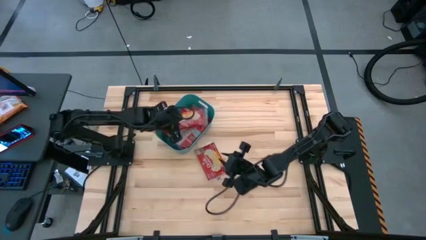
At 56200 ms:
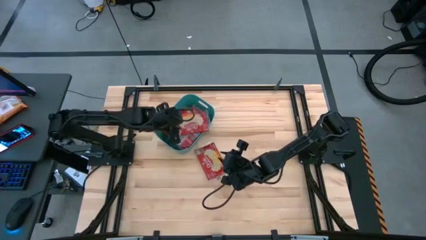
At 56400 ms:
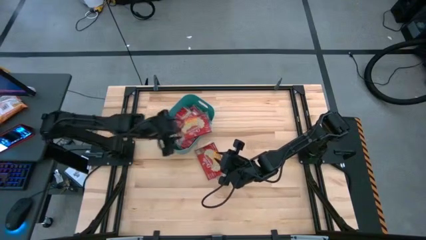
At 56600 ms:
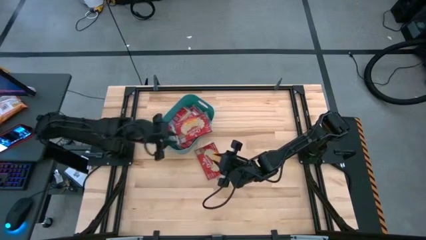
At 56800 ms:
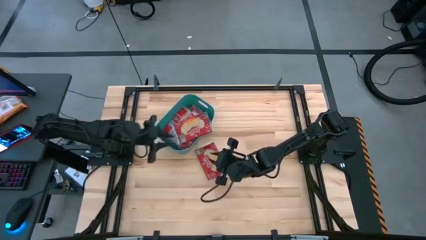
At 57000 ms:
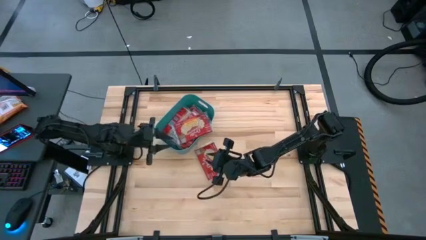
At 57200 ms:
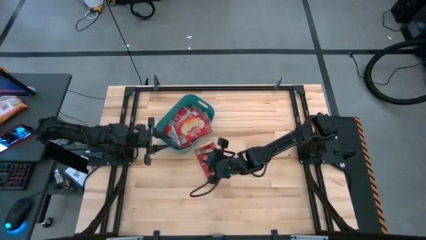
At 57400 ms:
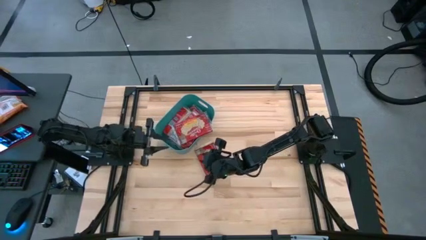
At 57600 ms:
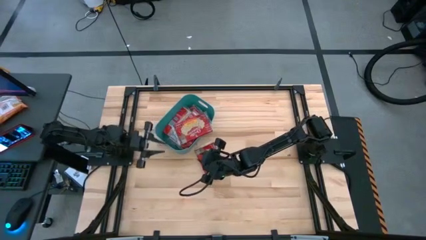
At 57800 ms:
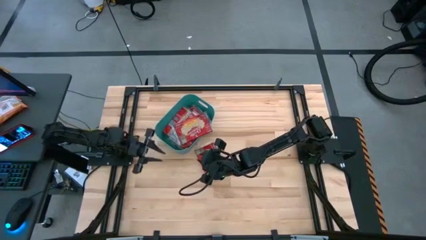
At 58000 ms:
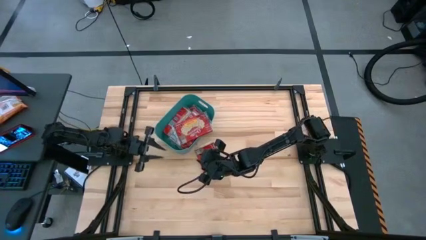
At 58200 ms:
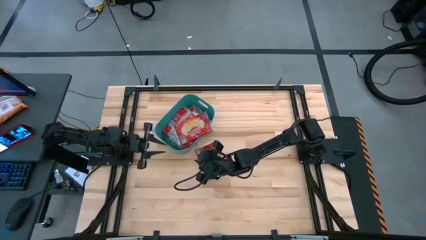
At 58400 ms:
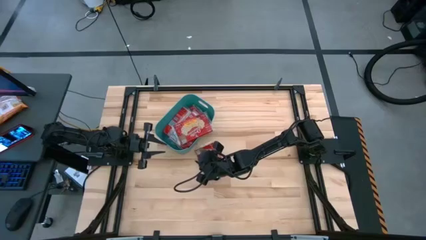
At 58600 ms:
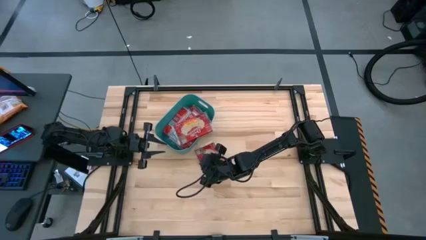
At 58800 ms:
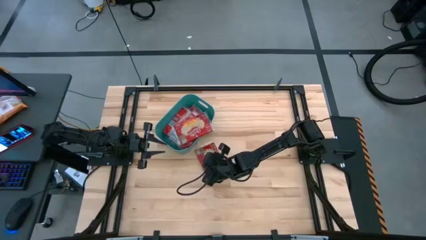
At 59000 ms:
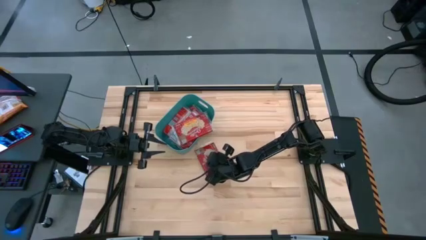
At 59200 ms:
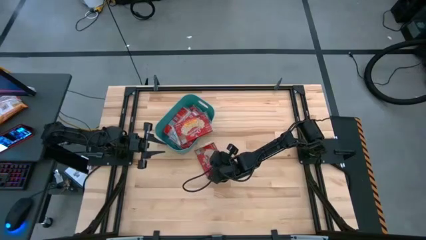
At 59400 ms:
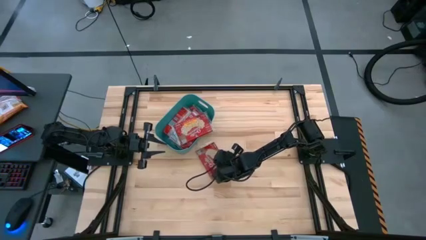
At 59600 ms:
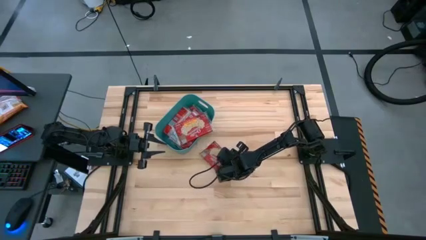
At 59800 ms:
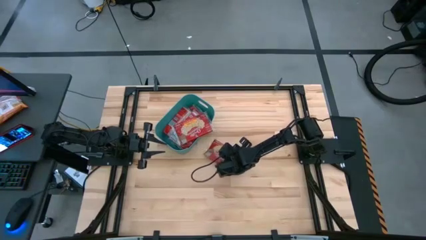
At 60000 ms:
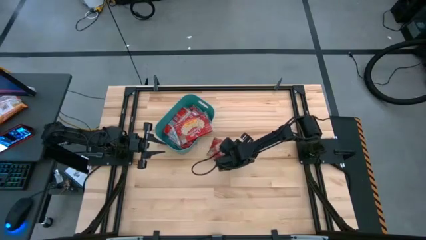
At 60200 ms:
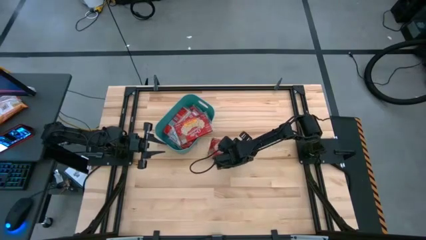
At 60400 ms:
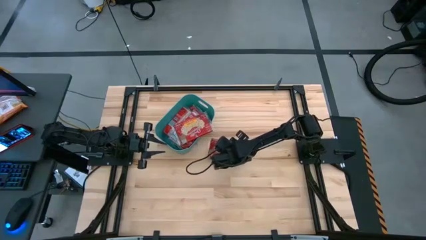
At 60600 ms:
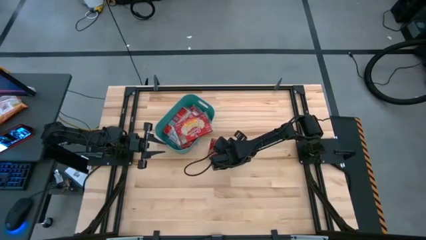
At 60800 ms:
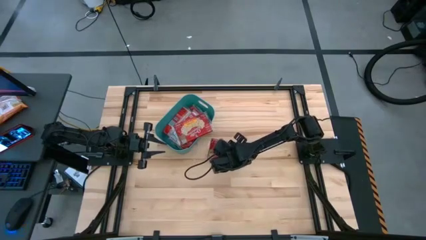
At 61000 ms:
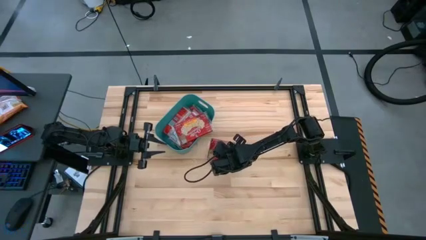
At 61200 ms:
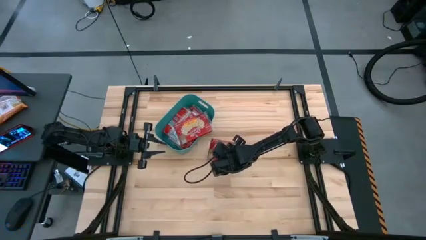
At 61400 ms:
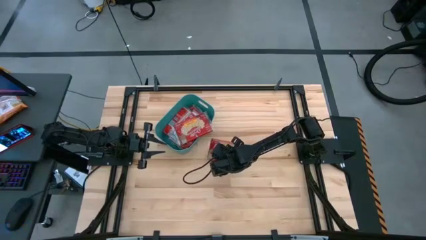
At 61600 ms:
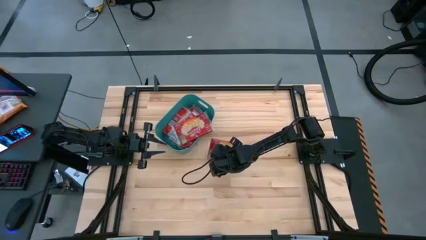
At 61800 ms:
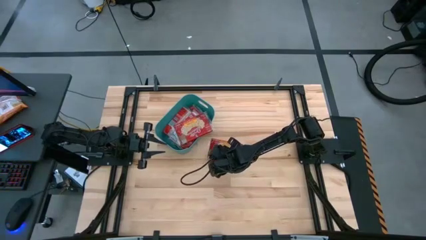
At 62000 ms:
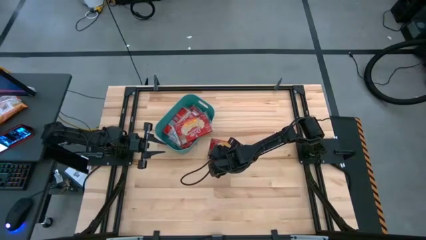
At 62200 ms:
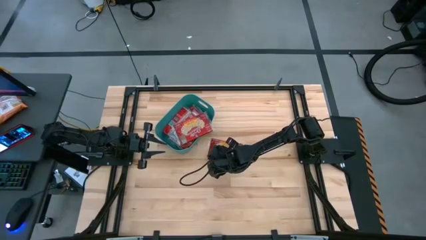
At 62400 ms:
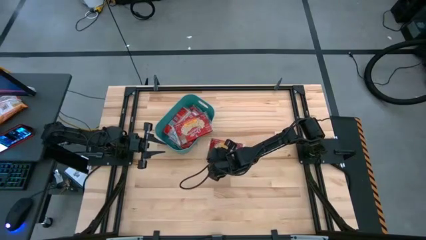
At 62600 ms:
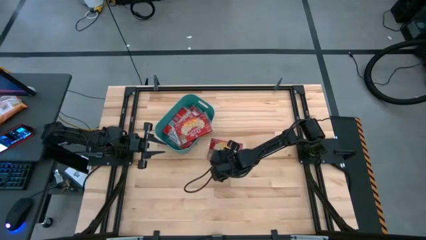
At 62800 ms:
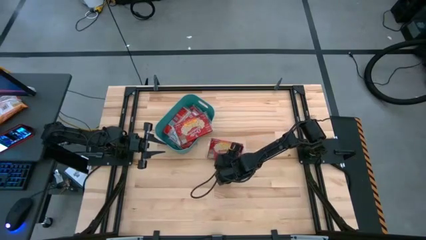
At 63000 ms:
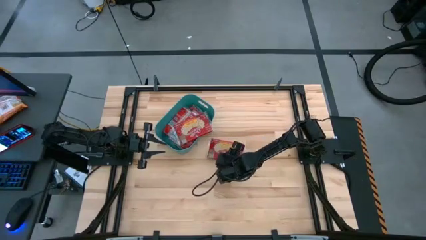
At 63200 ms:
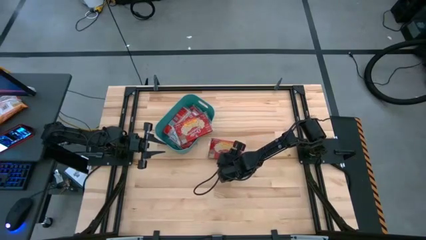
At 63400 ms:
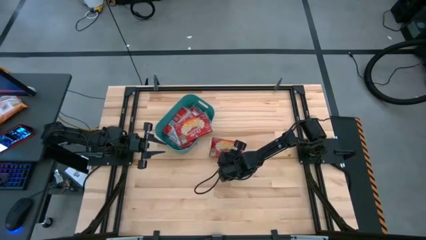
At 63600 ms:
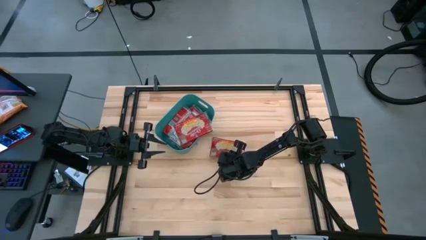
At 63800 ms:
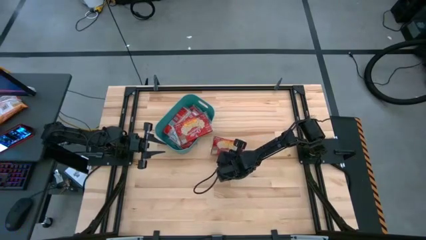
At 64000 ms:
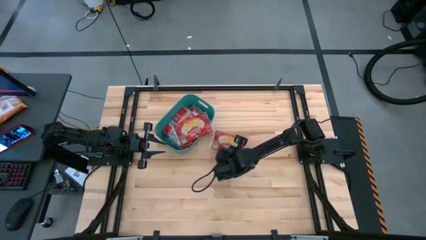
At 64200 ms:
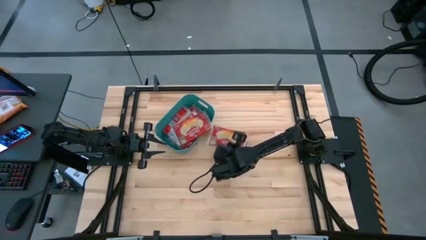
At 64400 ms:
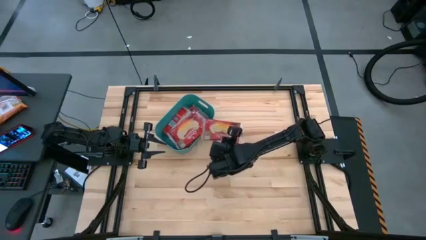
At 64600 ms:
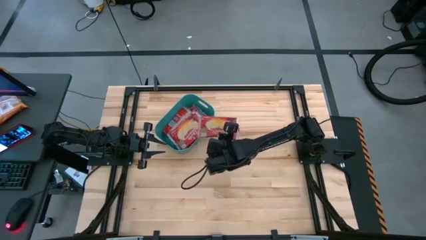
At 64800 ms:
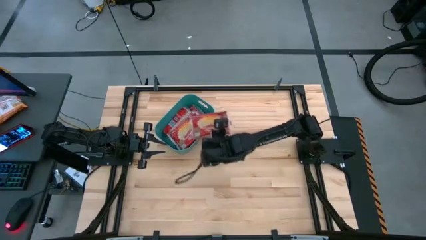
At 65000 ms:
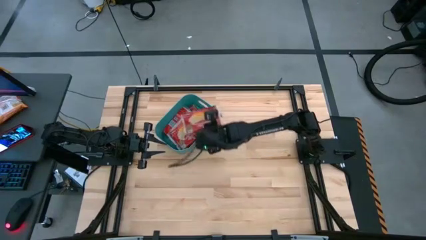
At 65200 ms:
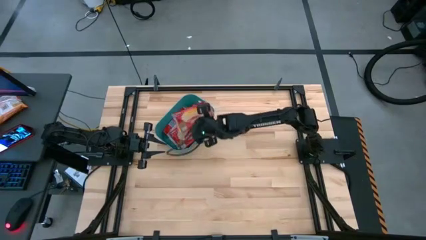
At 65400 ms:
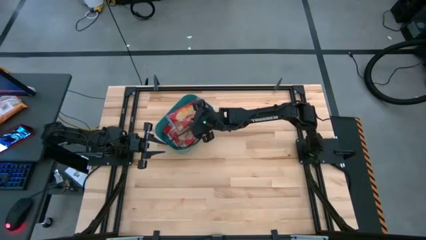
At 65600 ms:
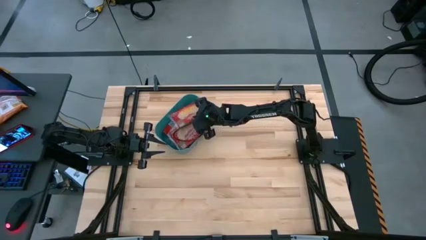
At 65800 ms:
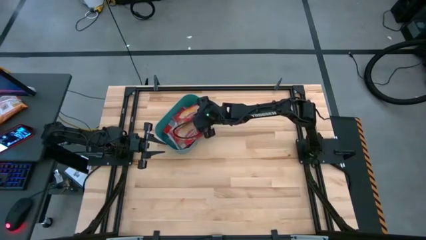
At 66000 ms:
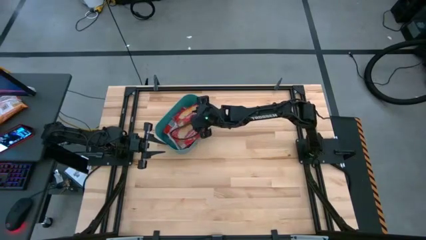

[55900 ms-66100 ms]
Task: Sort popcorn bags into baskets
Put the red popcorn bag into the blue bin

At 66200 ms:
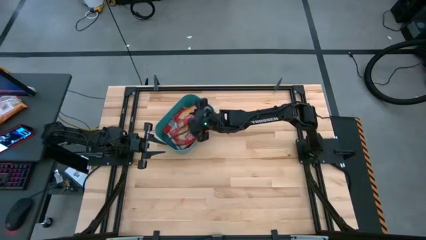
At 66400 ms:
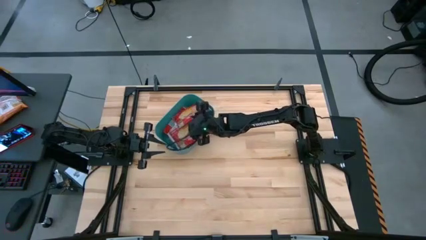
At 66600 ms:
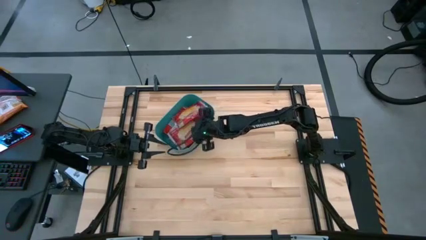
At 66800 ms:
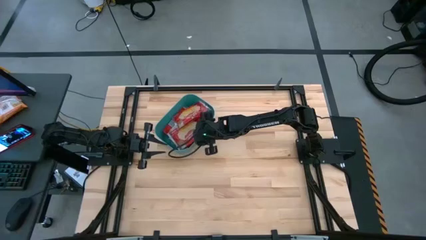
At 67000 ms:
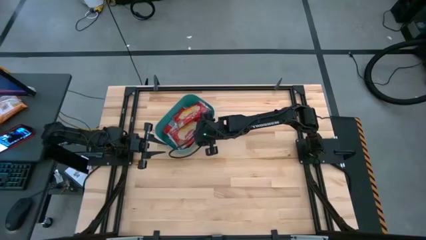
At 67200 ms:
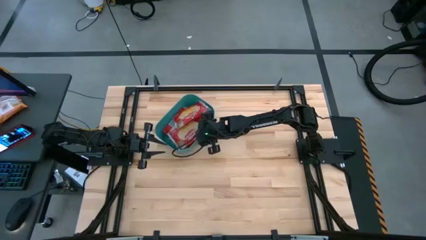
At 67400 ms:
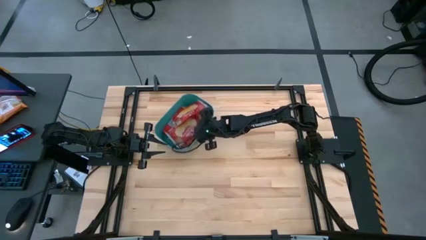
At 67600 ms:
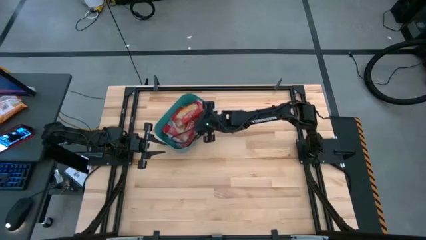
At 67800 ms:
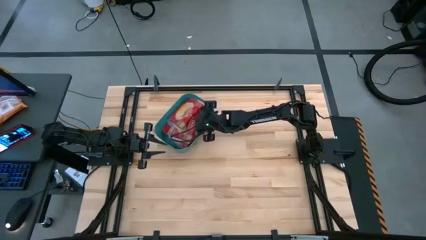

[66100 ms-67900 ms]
Adjust the red popcorn bag in the blue bin

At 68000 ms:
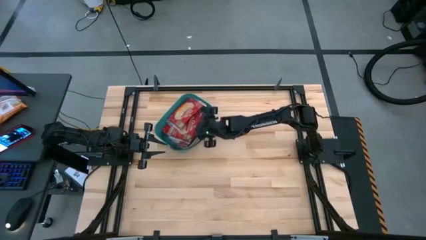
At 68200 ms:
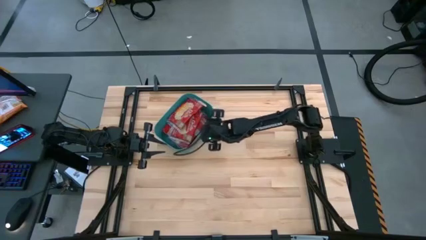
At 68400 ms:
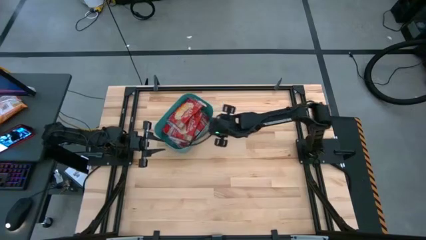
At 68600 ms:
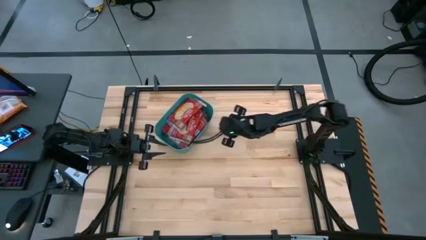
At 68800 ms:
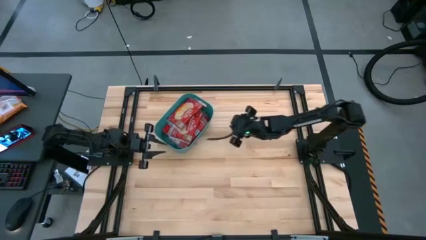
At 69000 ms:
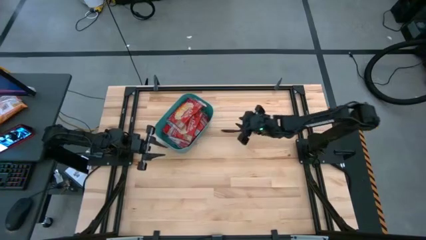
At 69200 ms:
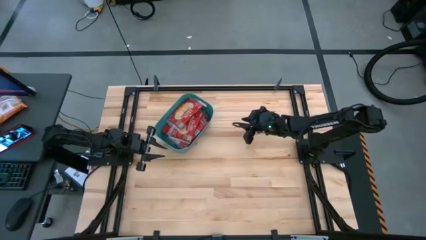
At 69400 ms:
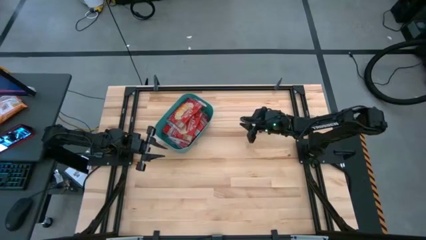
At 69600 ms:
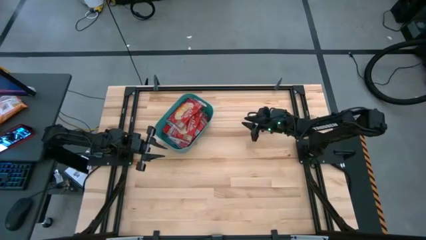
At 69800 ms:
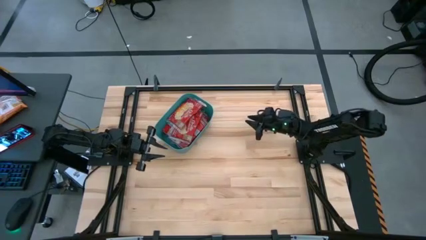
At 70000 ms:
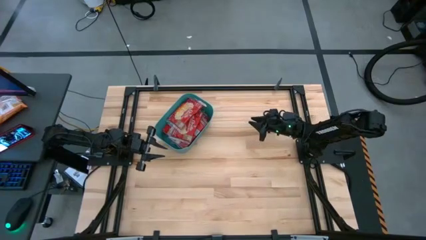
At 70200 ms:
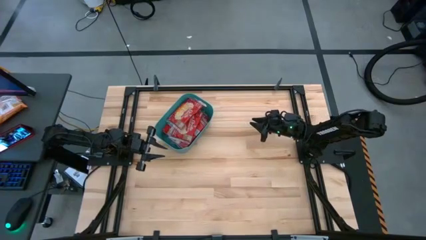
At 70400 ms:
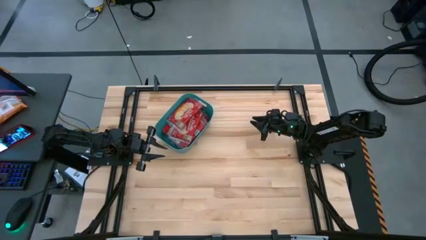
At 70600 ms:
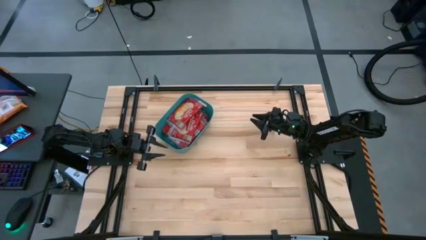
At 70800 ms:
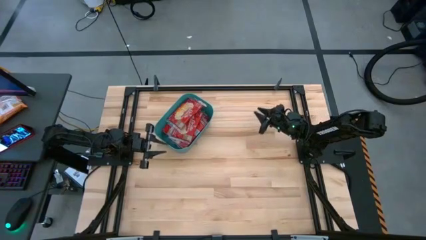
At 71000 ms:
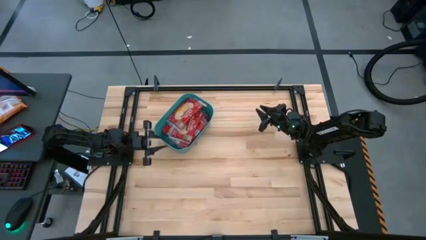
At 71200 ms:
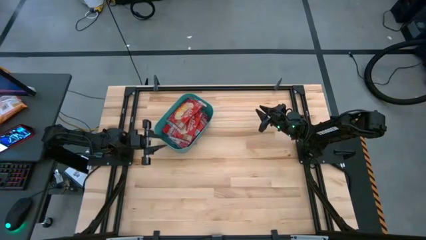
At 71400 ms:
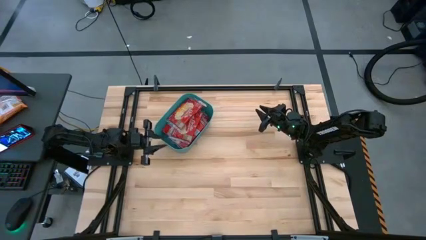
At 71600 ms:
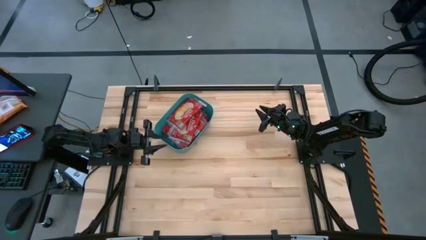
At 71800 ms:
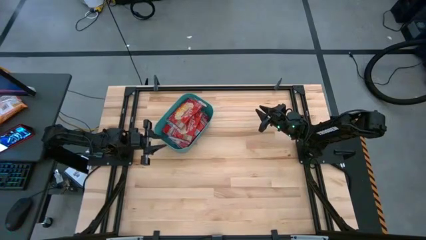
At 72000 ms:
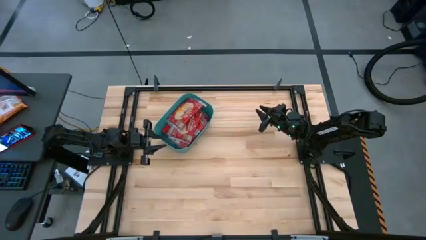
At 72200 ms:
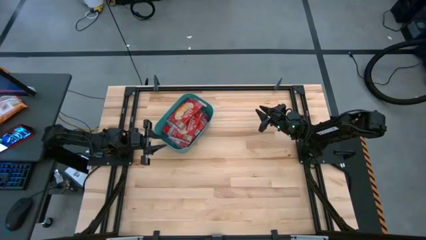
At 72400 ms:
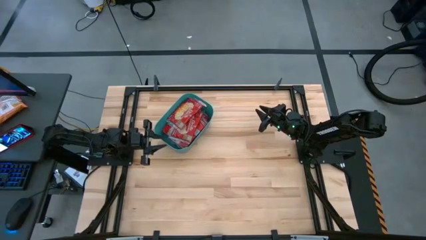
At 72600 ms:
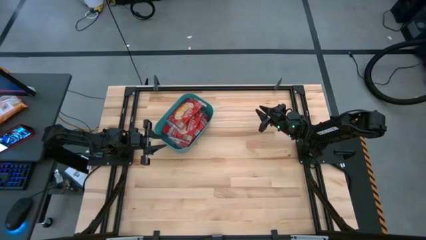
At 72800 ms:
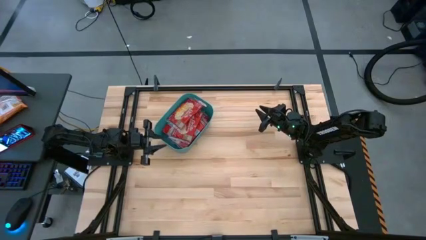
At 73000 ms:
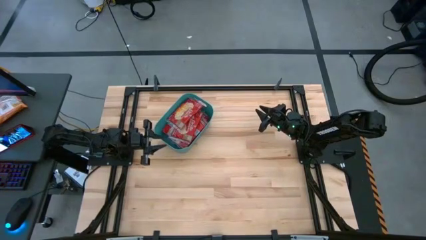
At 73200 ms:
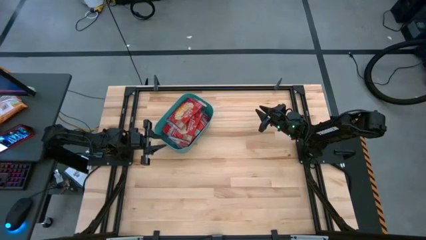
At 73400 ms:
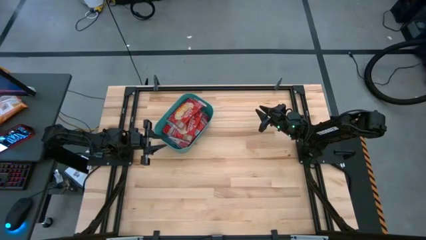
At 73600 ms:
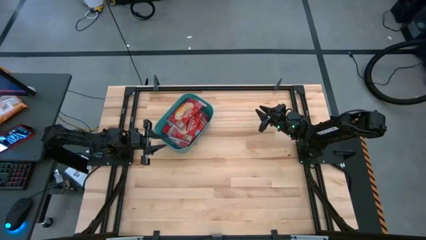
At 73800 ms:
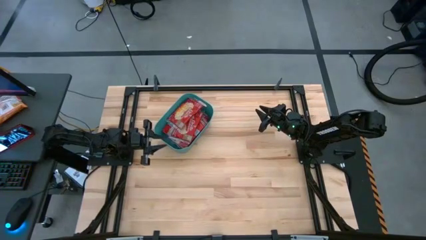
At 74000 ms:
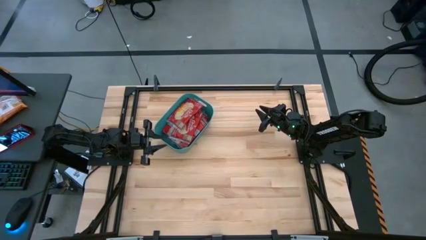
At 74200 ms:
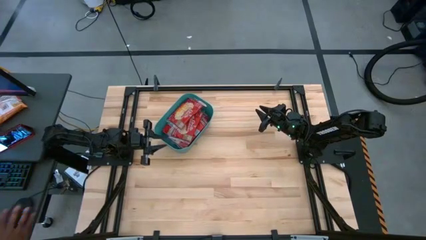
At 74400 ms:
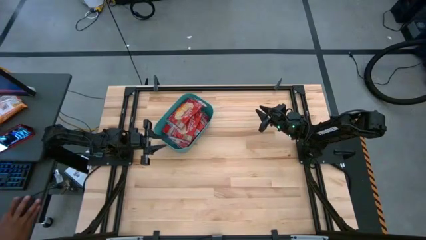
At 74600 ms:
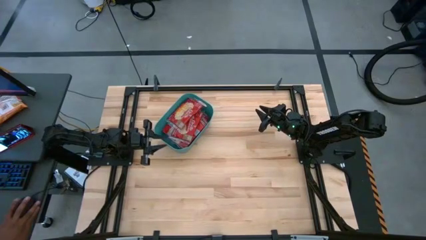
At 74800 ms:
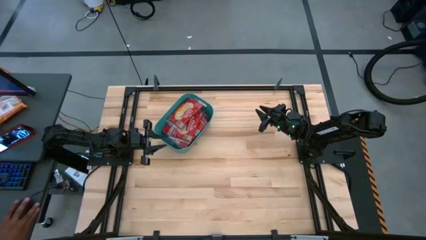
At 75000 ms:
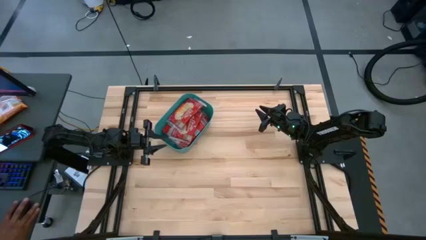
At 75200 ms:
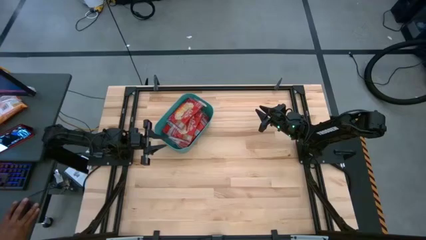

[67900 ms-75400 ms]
Return to Home Position
